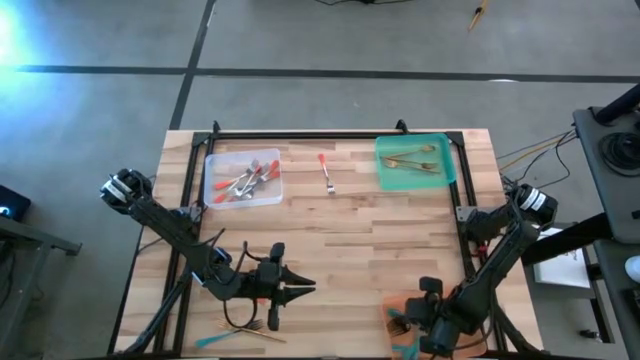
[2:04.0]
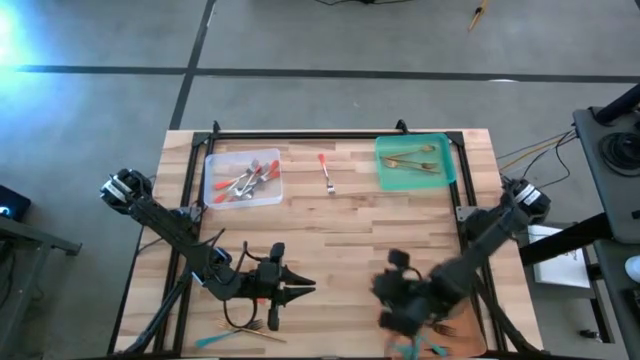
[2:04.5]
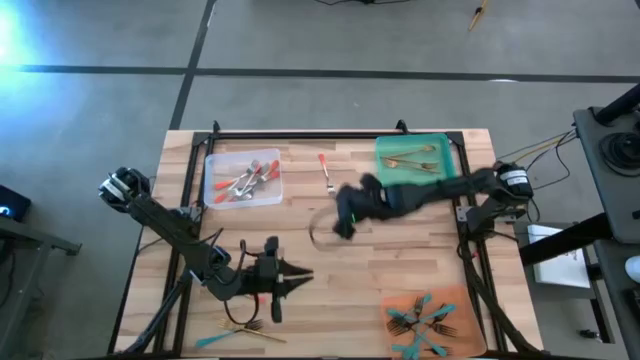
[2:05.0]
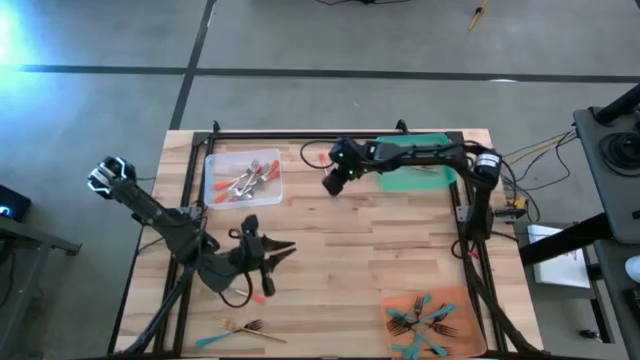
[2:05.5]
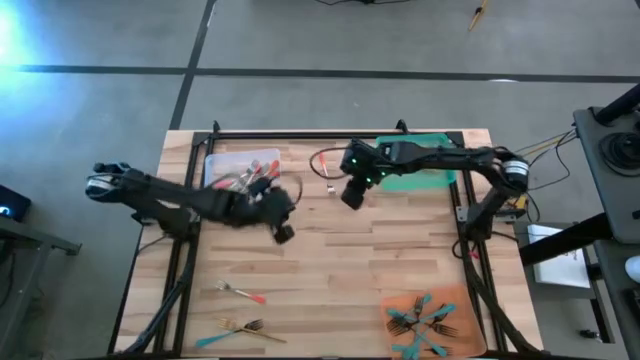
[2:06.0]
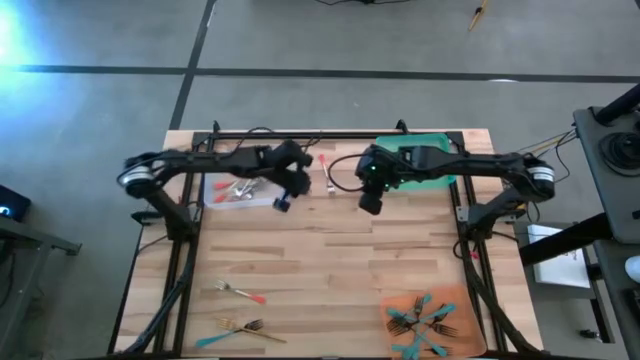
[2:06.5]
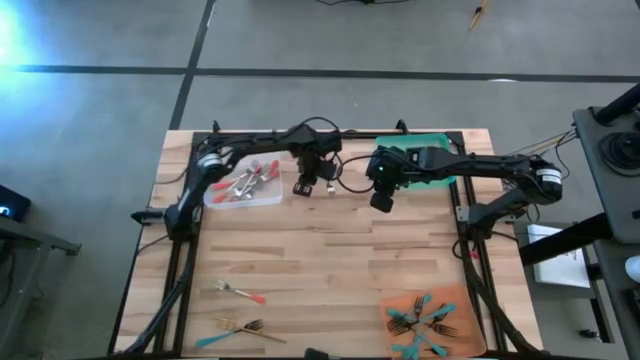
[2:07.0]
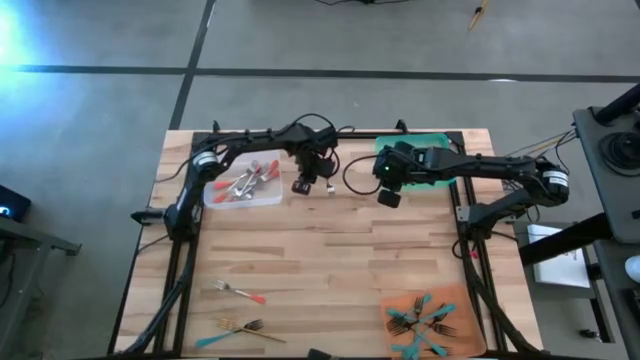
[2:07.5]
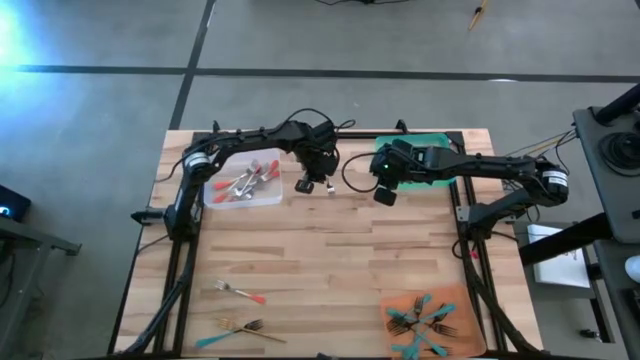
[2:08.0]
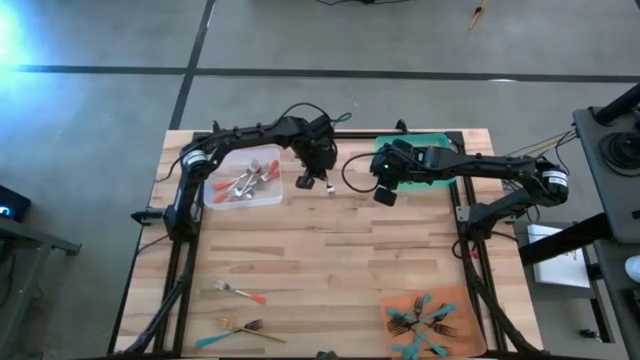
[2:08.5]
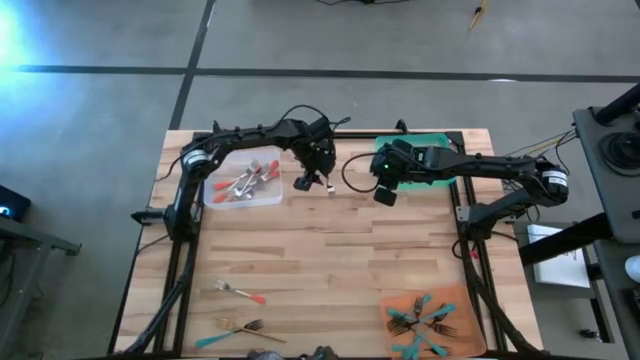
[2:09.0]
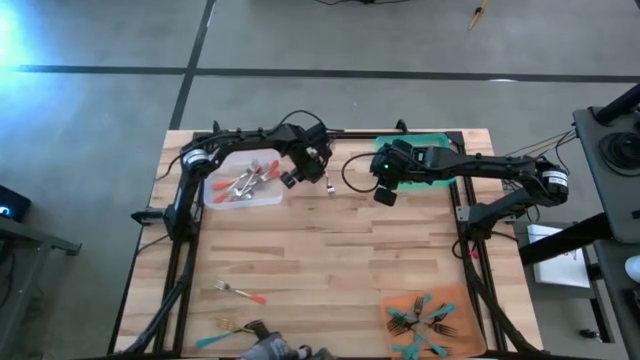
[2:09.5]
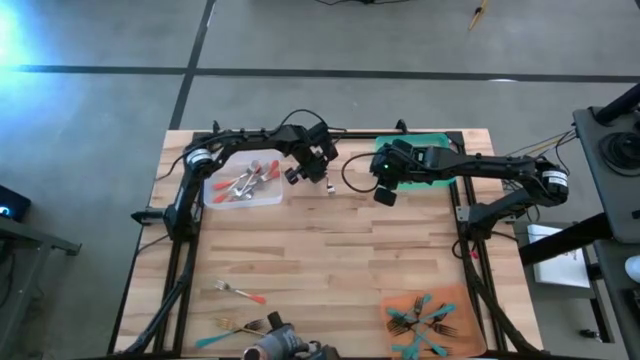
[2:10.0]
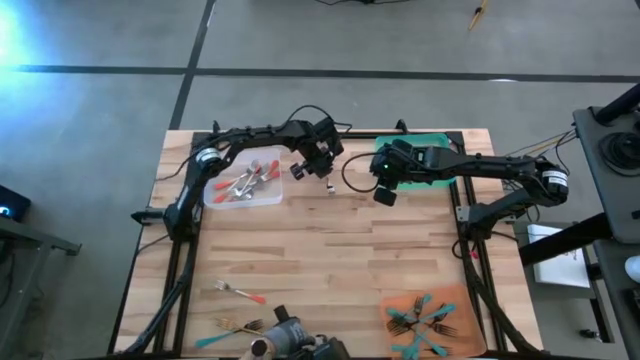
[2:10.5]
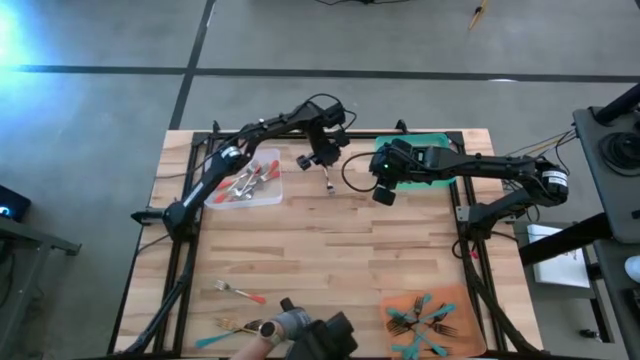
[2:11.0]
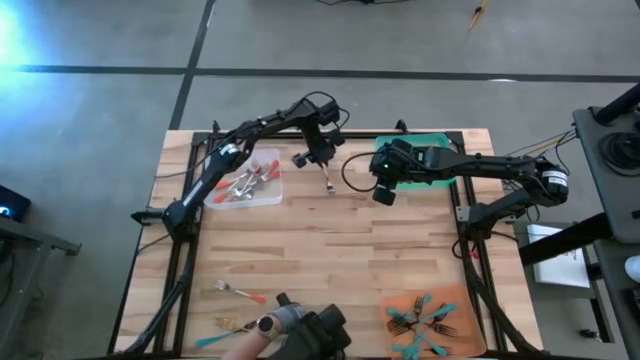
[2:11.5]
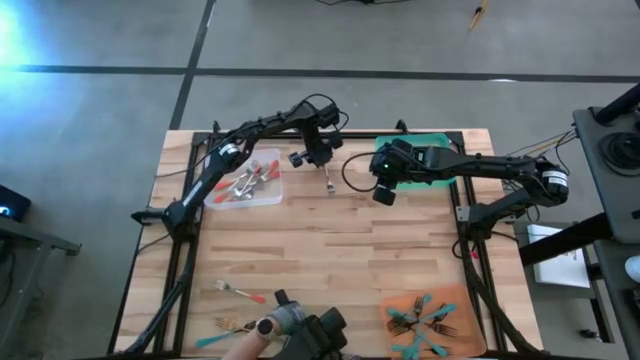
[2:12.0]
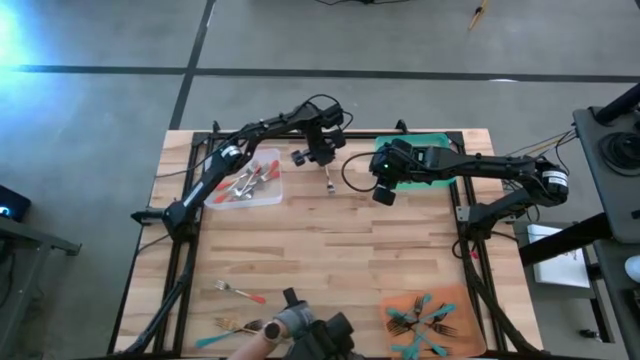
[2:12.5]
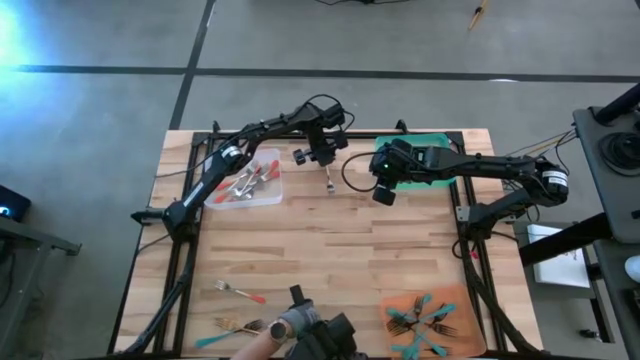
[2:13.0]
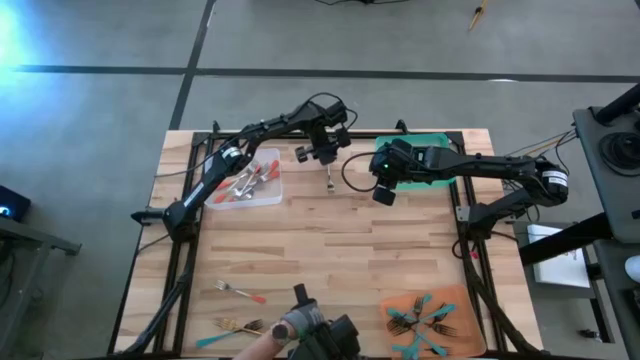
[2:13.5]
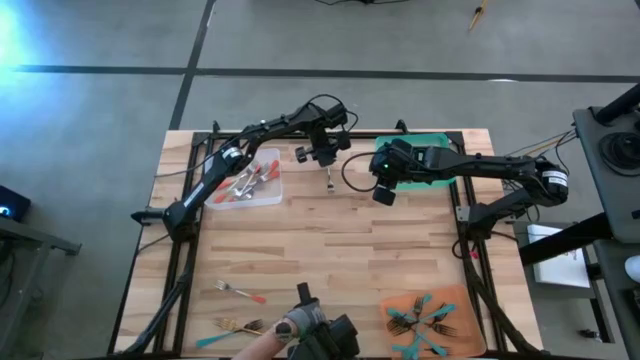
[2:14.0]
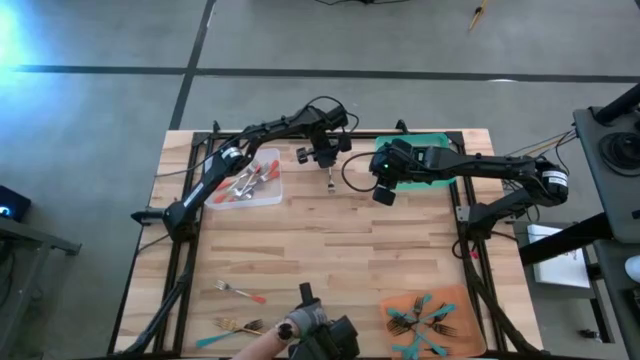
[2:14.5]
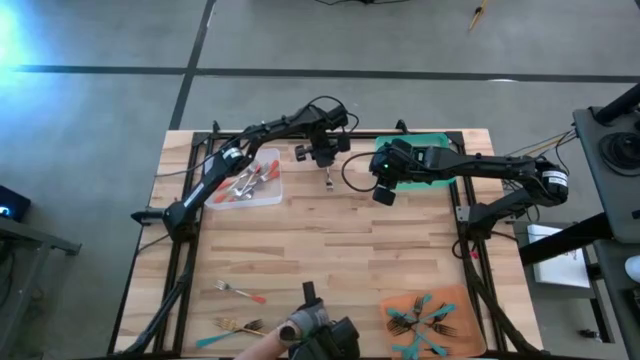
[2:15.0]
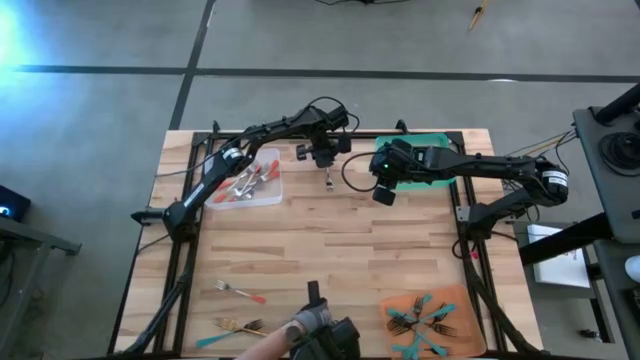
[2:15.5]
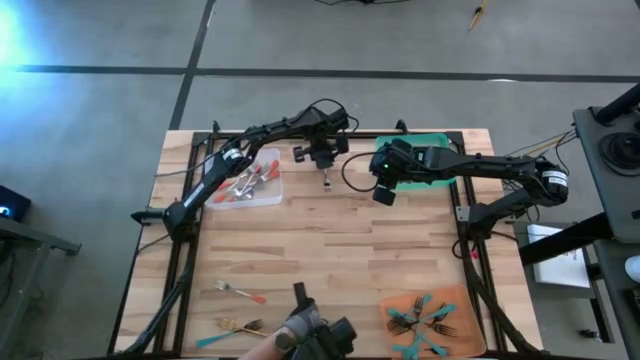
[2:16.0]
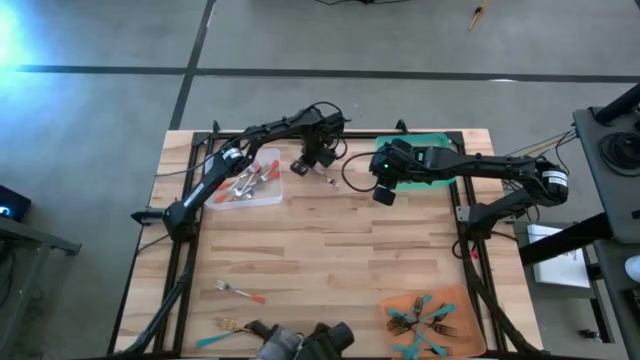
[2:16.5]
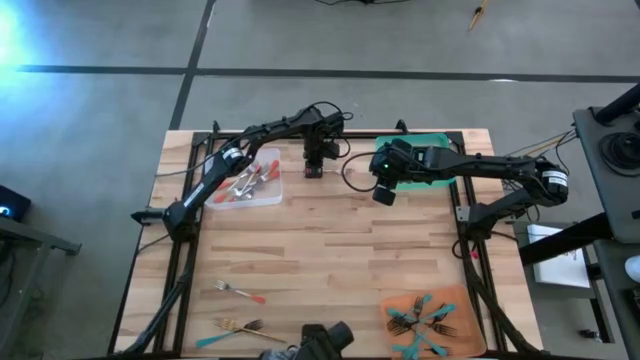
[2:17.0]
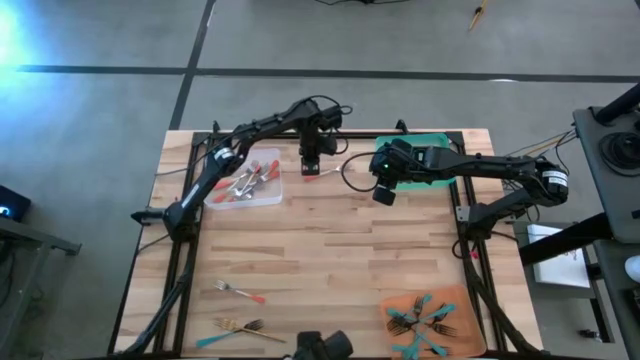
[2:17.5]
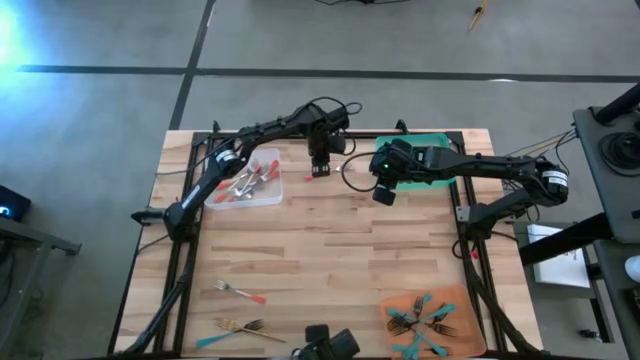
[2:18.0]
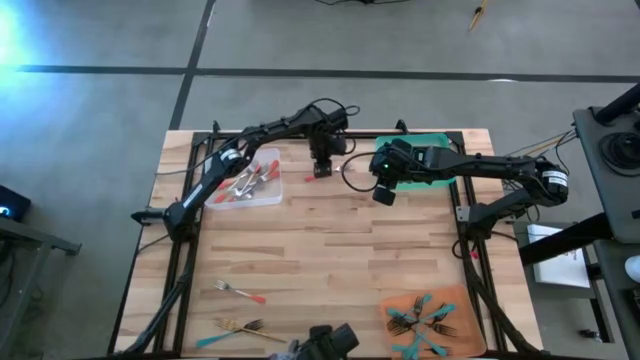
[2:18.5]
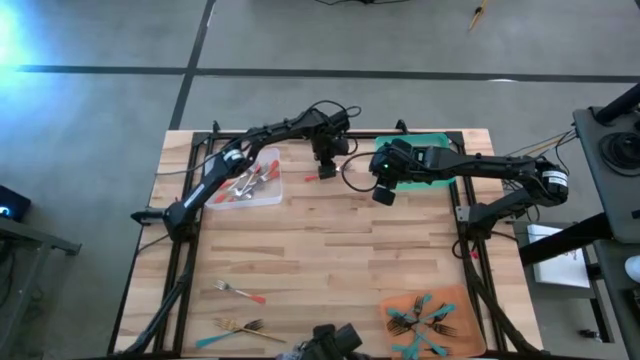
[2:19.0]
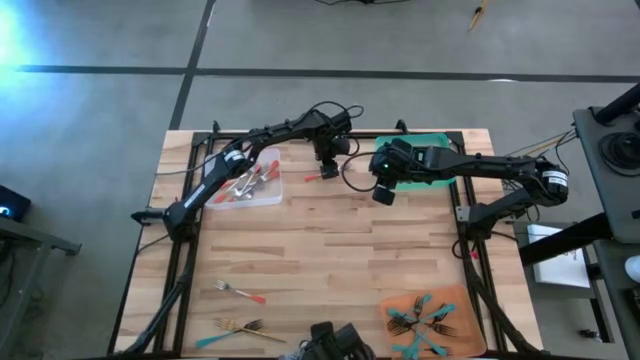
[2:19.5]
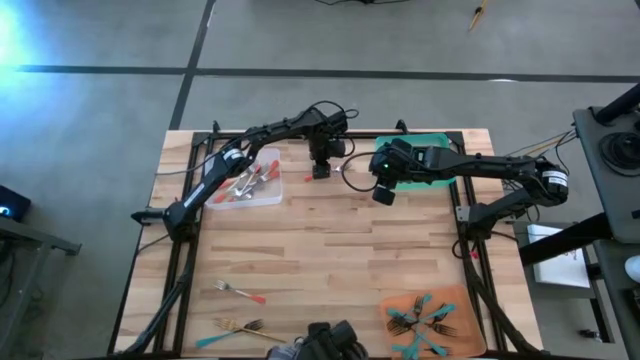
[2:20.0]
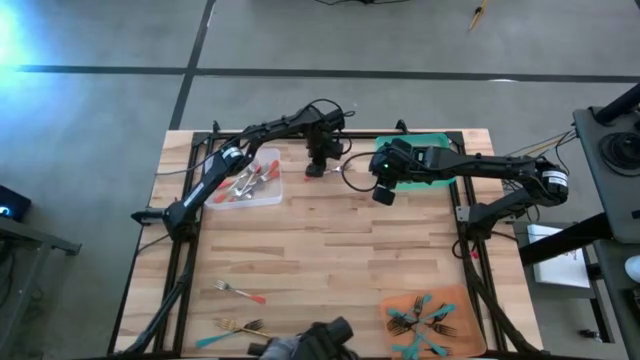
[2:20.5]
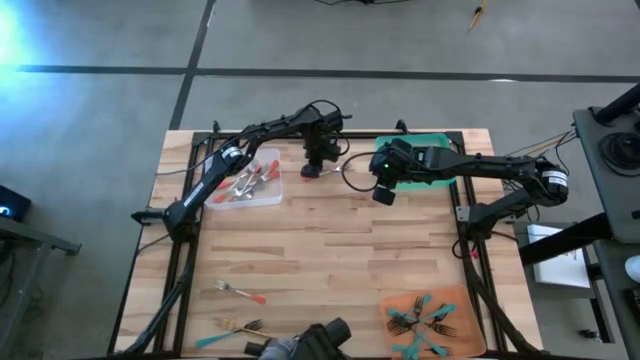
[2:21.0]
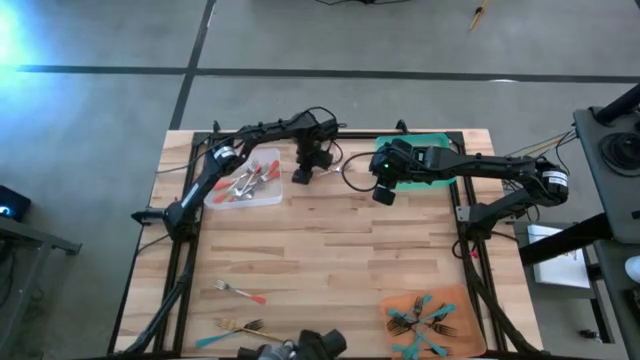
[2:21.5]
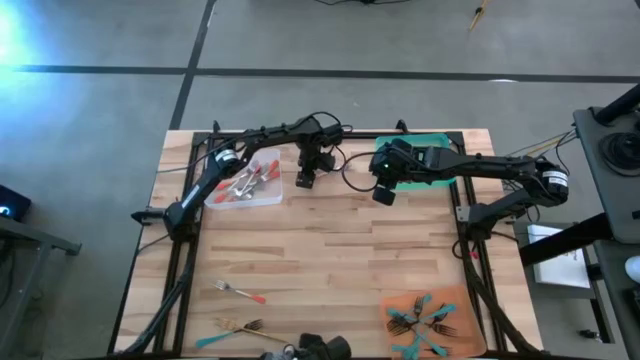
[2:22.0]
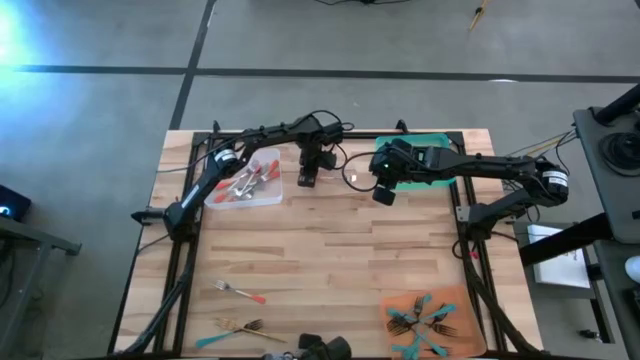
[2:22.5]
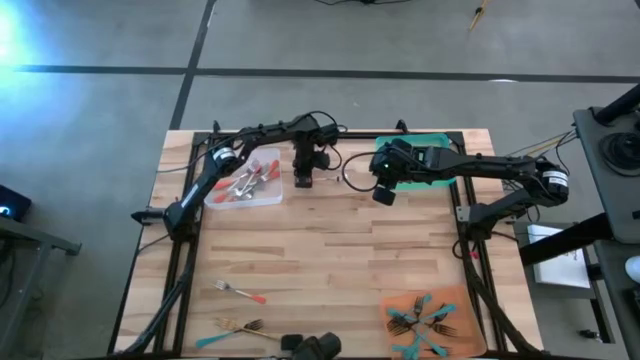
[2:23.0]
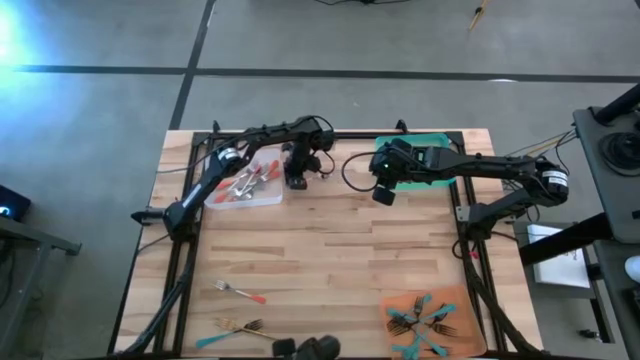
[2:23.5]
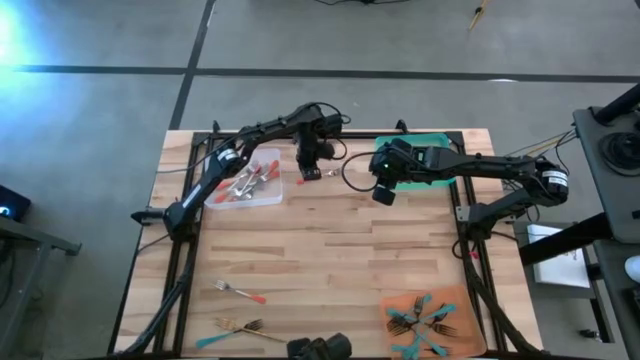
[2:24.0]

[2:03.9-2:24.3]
Task: Sort silverware by color (type)
Put the orange fork into the white bin

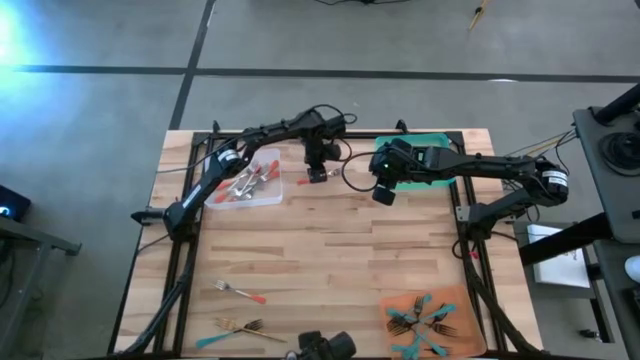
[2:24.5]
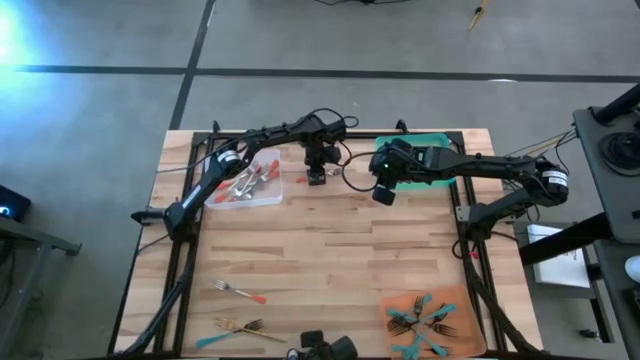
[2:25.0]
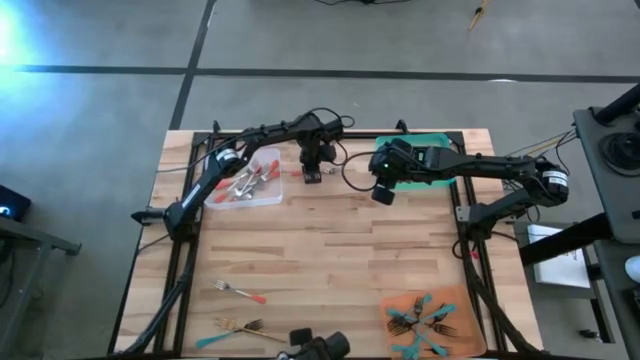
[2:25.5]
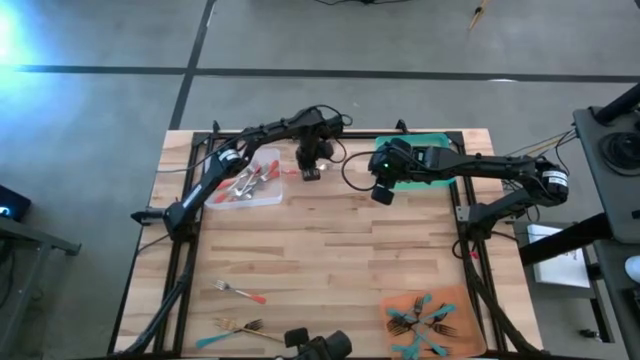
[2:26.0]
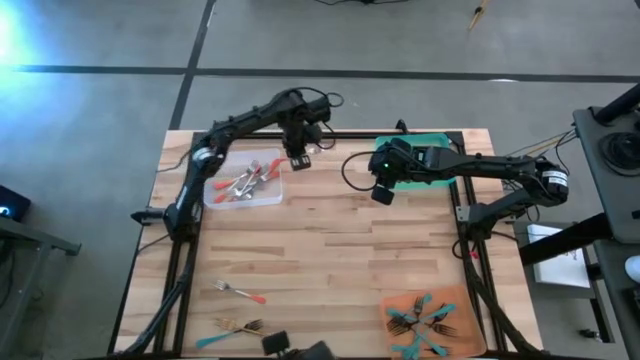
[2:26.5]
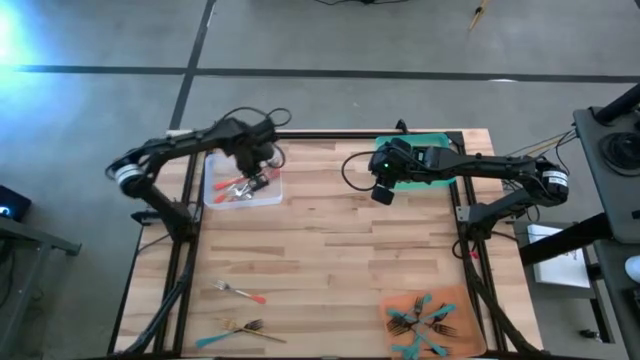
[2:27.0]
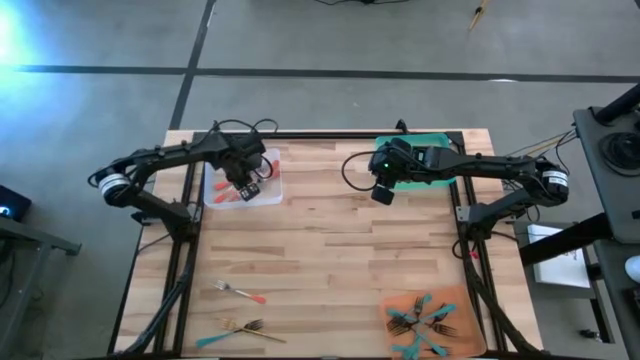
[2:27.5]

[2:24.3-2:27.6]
Put the orange fork into the white bin
